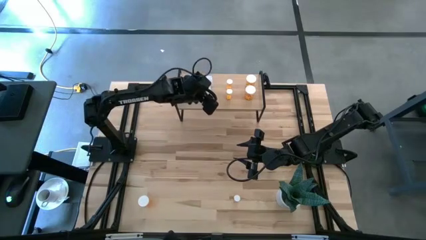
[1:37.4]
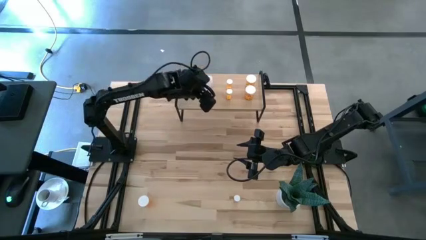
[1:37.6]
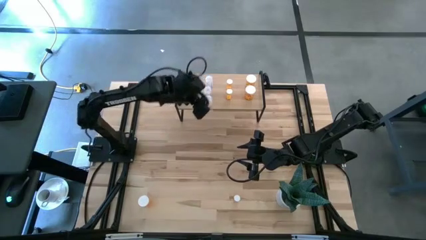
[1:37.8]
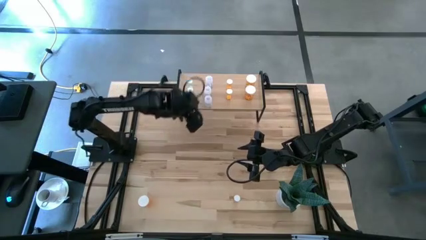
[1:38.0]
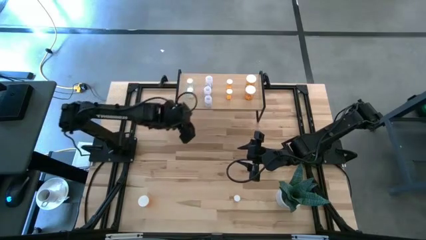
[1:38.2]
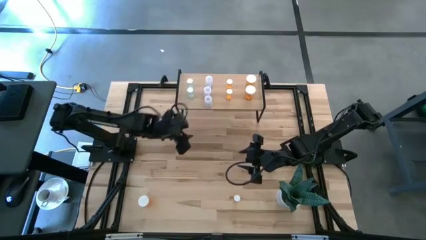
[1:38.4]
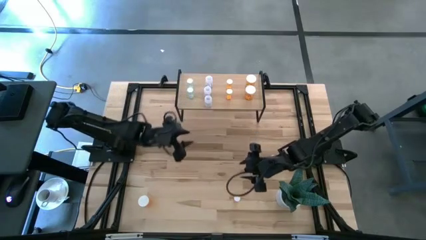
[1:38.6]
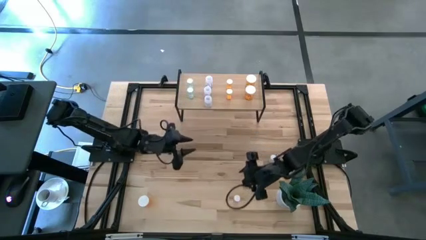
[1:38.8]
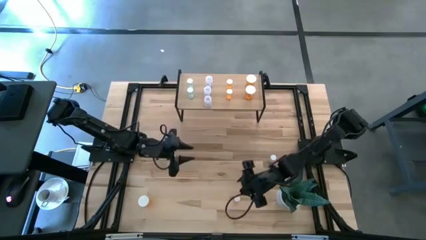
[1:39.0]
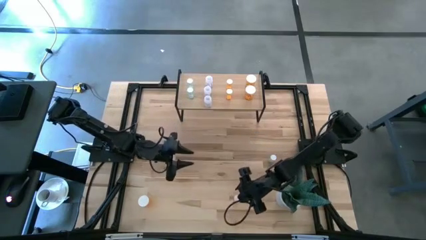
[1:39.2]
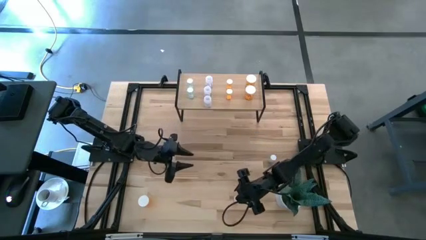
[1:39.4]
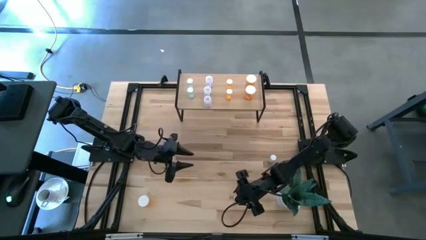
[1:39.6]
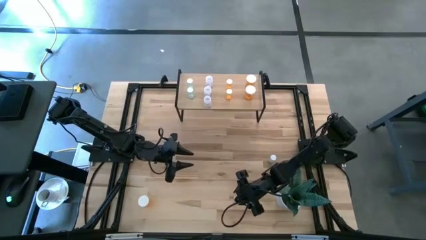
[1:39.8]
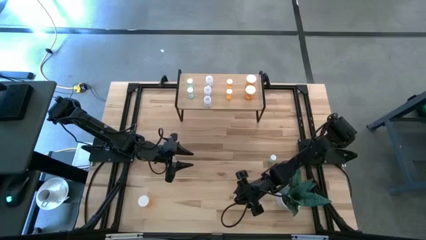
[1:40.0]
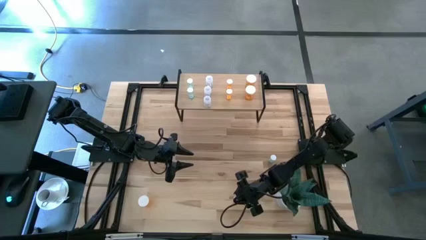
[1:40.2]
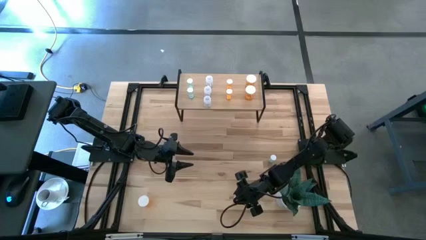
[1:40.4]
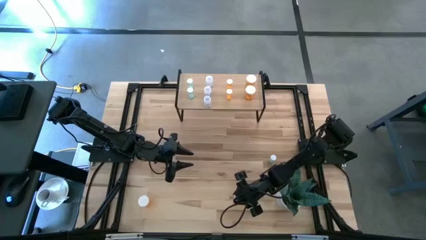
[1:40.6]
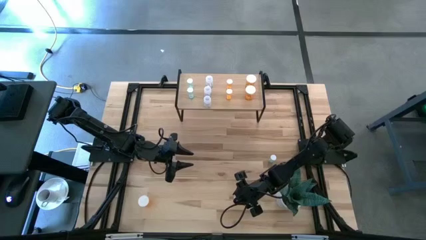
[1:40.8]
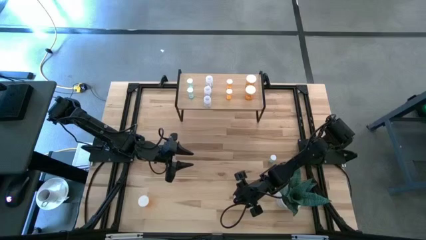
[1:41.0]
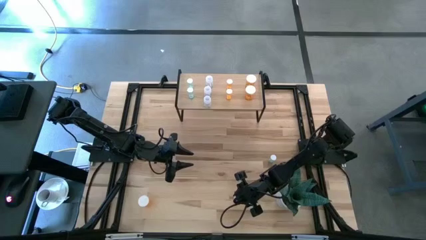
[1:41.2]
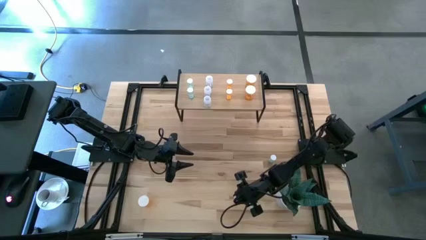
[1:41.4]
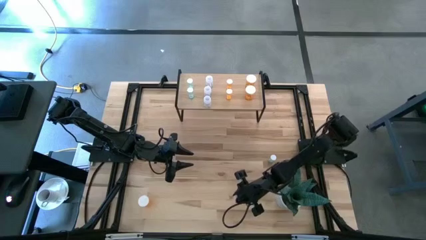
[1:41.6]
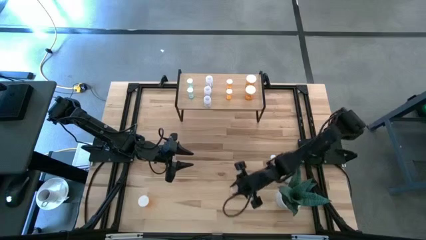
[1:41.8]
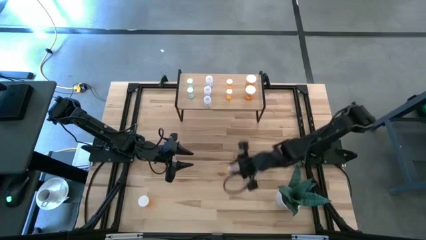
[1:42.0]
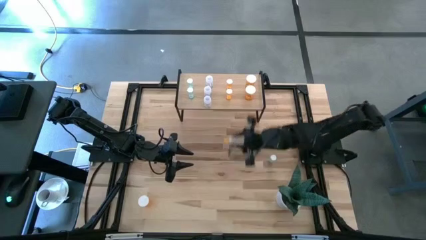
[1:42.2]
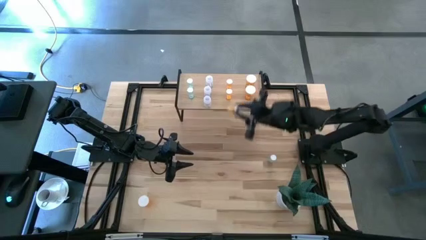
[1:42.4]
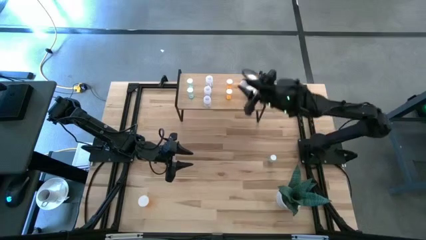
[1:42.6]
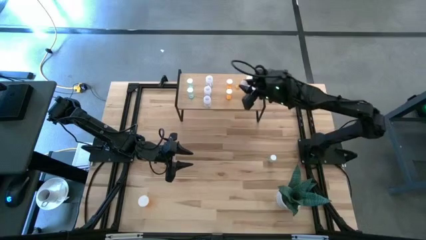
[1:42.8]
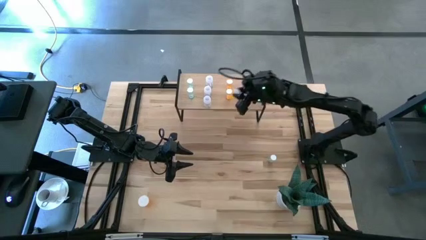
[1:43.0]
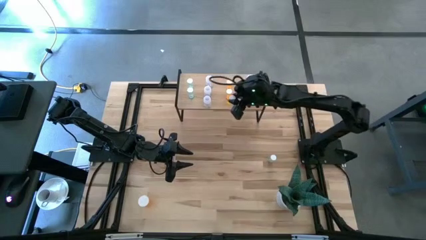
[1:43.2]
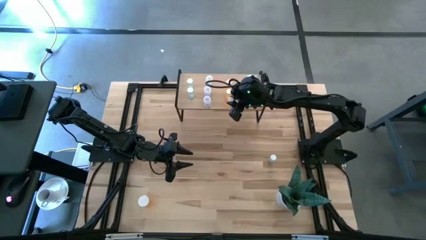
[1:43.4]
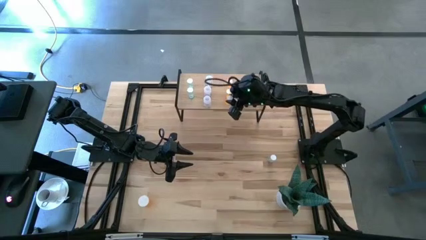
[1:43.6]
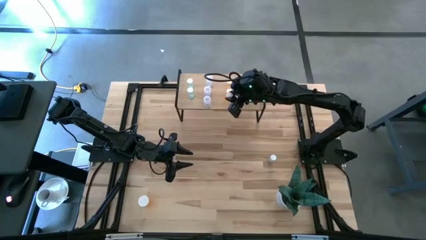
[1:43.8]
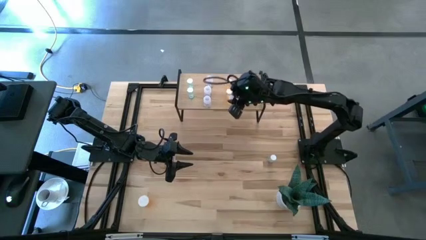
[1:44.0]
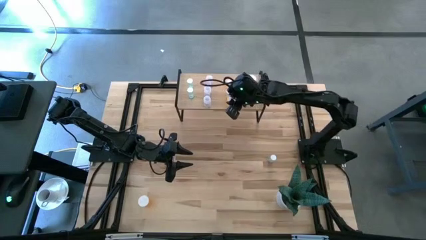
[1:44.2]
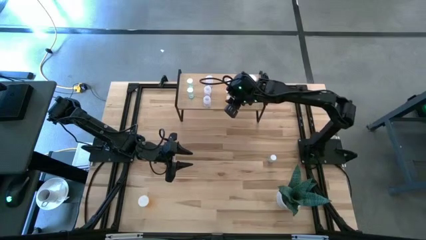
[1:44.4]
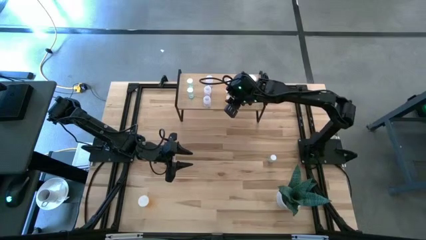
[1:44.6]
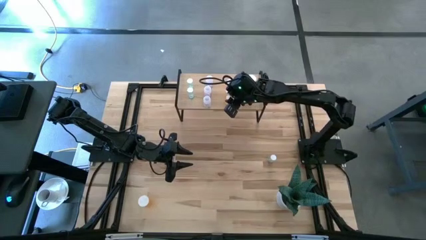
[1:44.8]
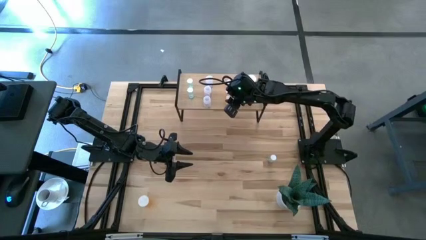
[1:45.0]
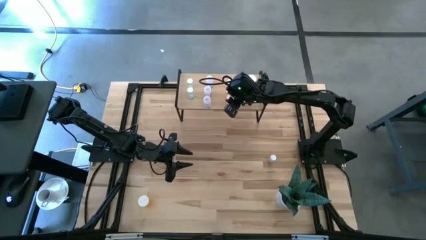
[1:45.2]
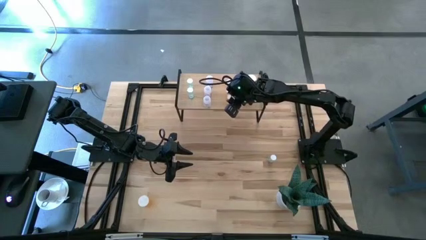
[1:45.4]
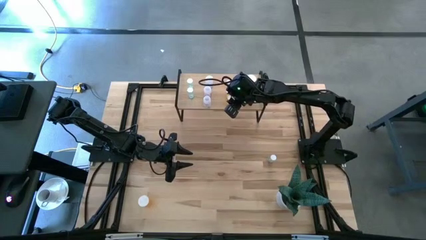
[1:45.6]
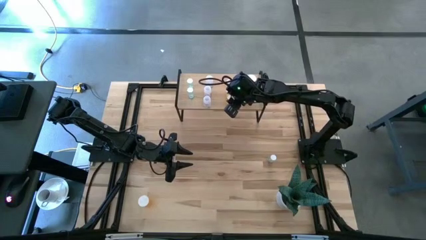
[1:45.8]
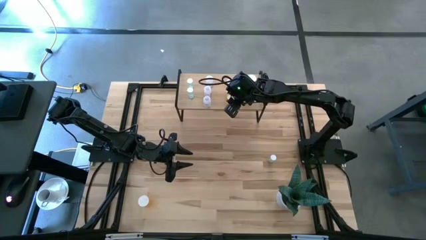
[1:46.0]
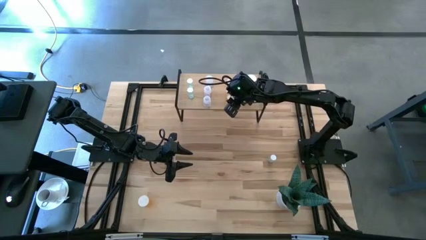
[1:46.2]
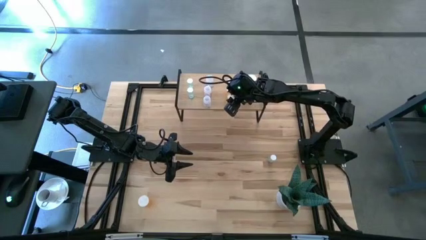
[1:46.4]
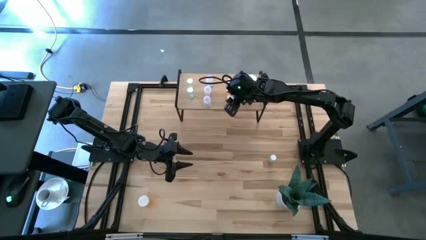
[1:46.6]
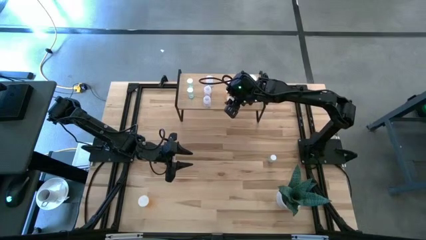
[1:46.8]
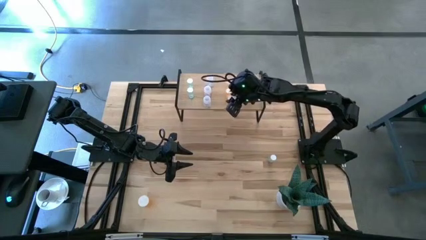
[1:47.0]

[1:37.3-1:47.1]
Task: Pick and place medicine bottles onto shelf by color
Put the small orange pill bottle on the shelf aligned with the other small orange pill bottles

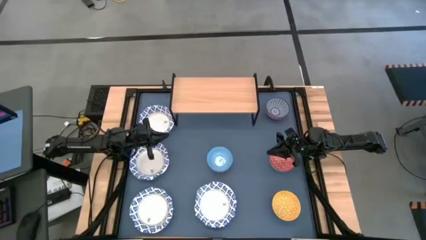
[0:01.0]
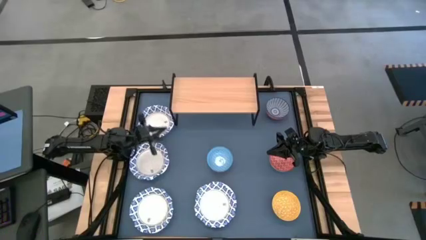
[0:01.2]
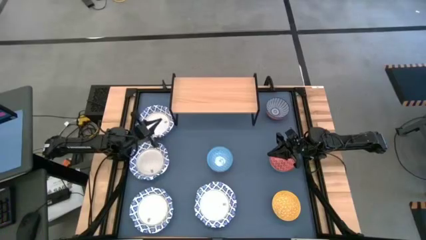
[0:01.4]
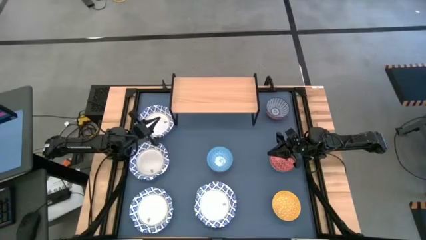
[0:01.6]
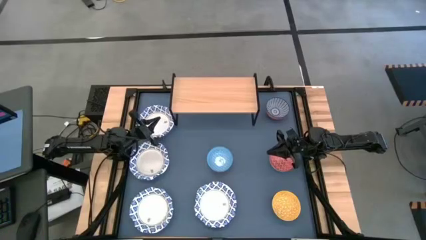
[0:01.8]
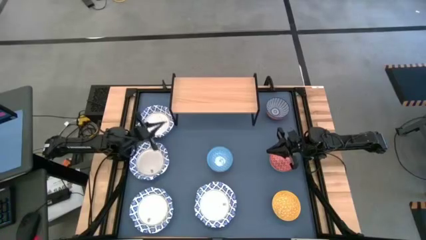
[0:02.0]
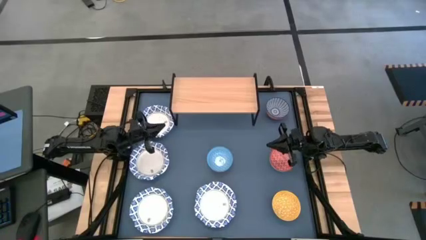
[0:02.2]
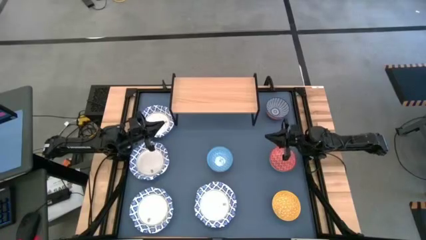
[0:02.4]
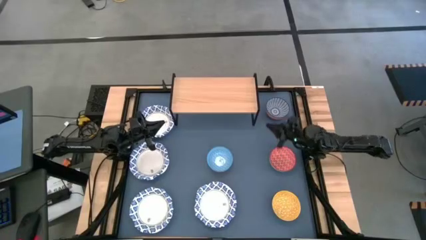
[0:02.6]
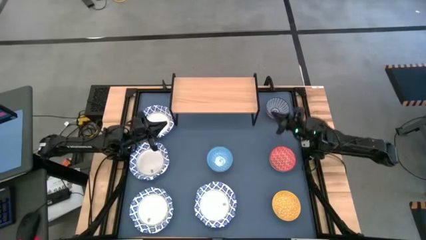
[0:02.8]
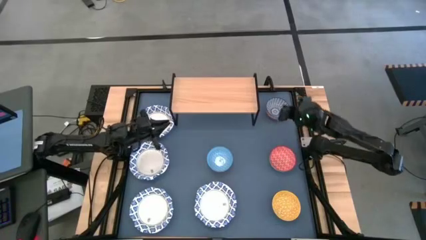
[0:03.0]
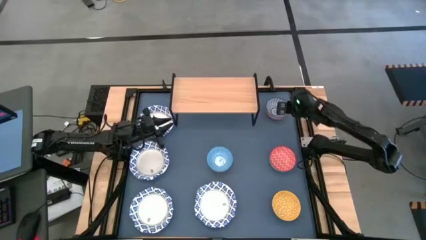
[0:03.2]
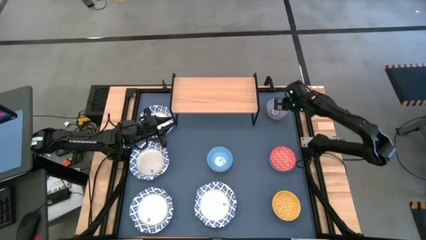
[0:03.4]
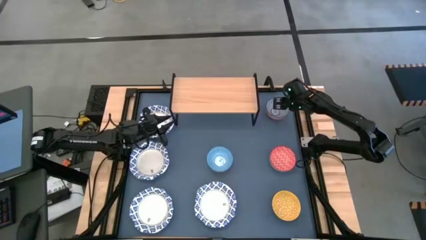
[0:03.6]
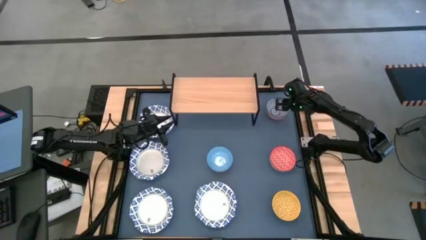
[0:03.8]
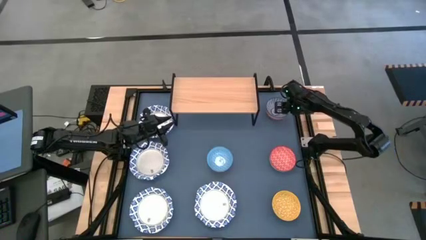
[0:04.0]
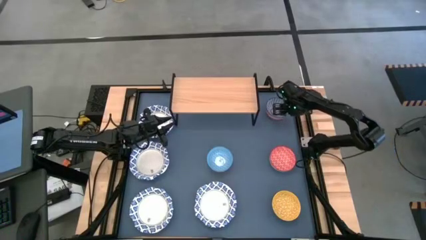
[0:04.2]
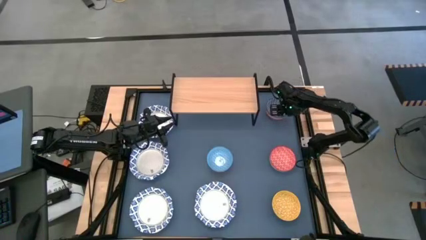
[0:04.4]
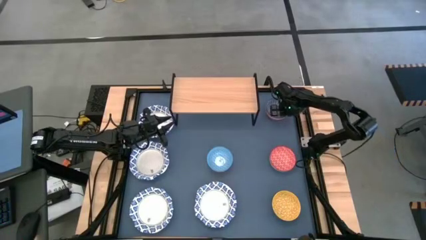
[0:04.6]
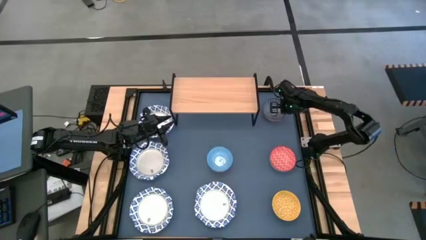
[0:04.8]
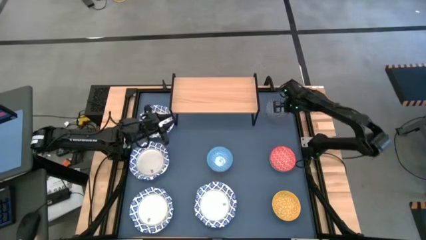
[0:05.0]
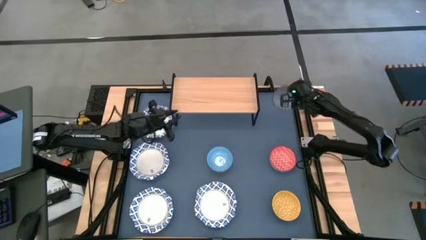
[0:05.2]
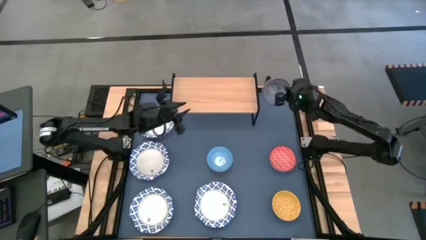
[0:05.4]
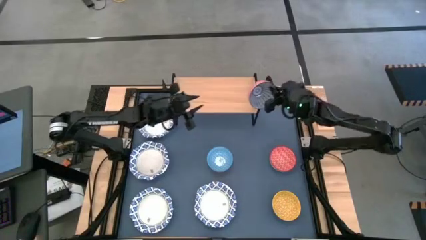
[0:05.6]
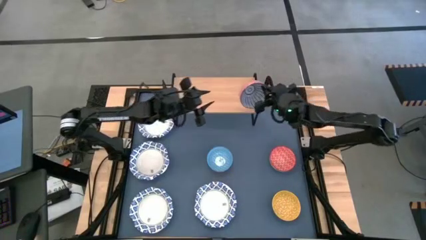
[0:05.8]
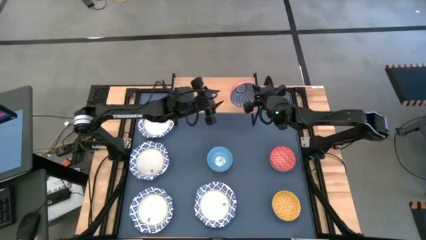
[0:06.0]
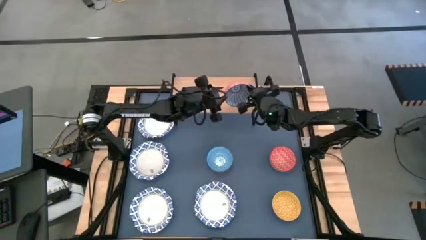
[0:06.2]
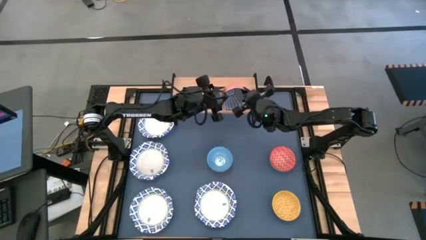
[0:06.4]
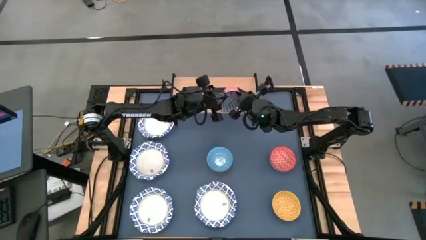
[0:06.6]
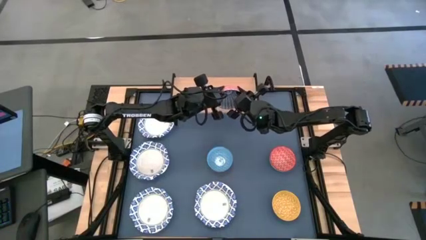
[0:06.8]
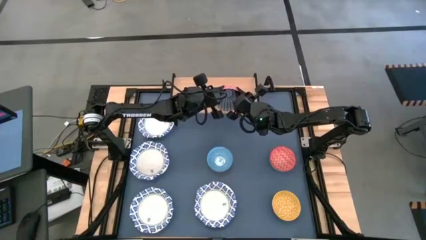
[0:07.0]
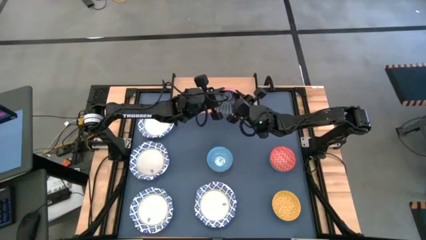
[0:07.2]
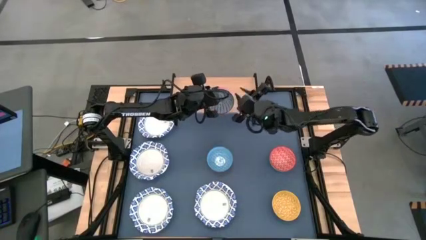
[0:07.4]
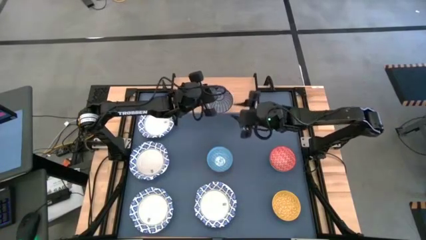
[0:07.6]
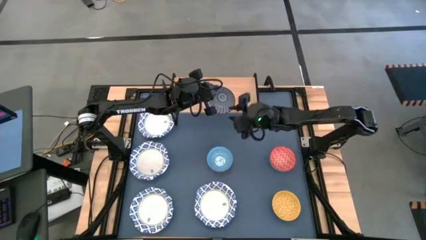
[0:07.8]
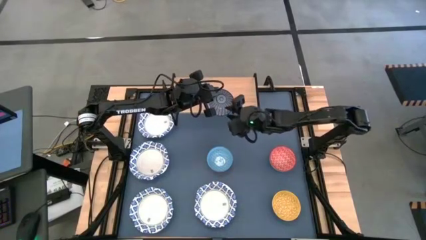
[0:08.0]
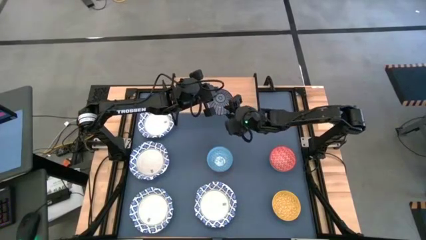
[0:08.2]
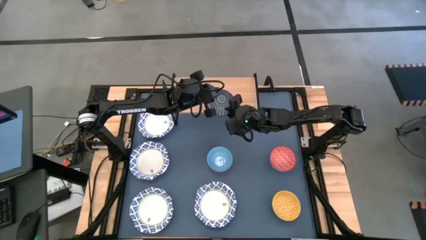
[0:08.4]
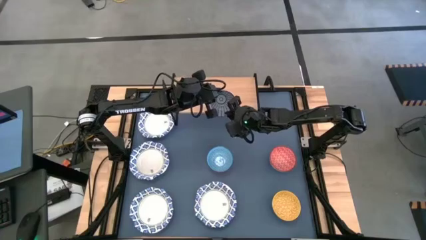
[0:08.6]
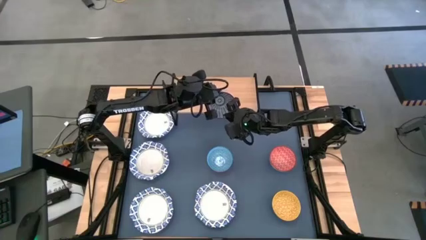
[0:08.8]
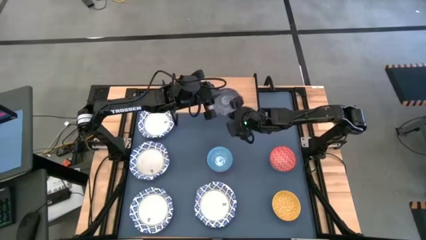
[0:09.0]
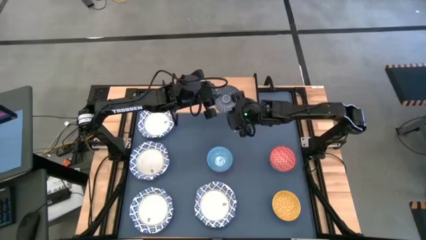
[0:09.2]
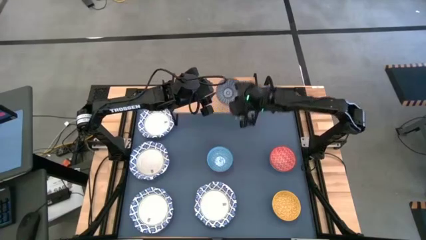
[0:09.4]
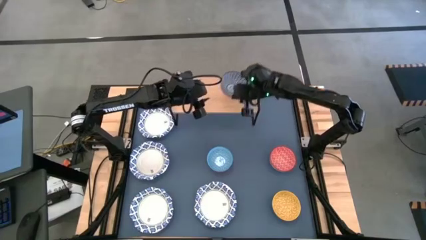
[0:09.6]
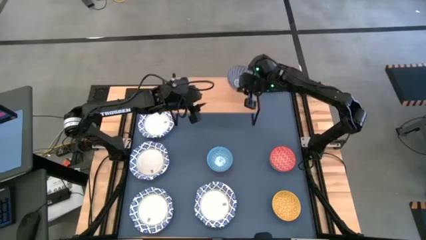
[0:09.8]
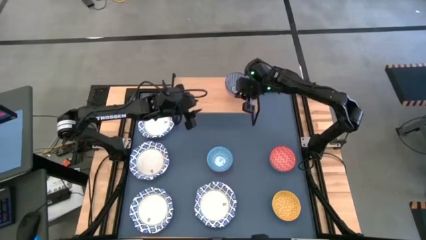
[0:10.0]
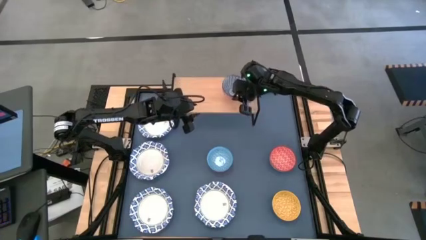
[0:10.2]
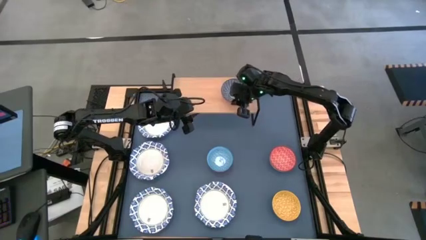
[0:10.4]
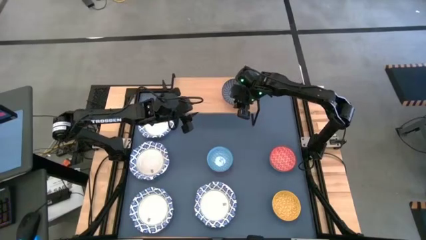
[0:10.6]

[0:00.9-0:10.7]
Task: Place and stack bowls onto a shelf
Put the dark blue patterned bowl on the shelf
